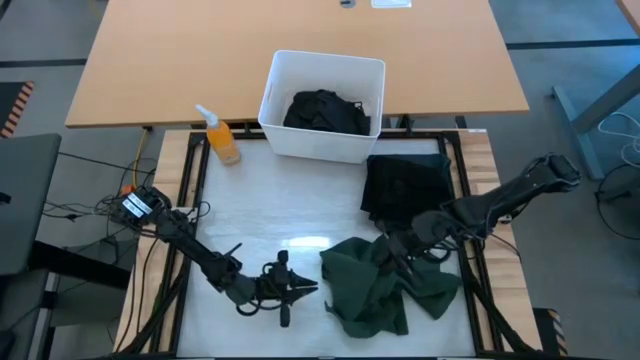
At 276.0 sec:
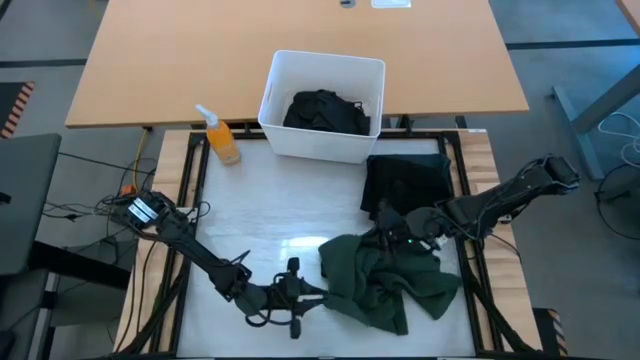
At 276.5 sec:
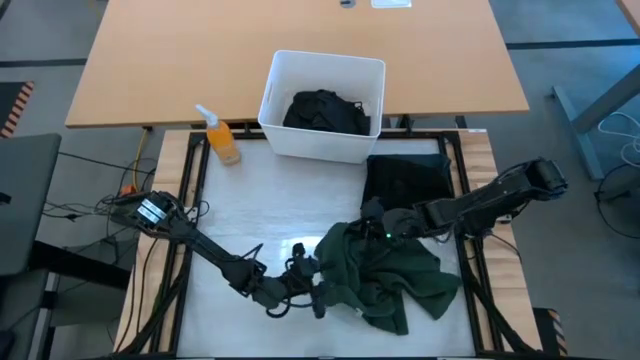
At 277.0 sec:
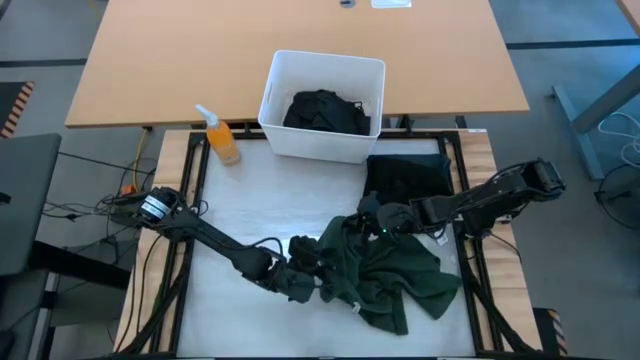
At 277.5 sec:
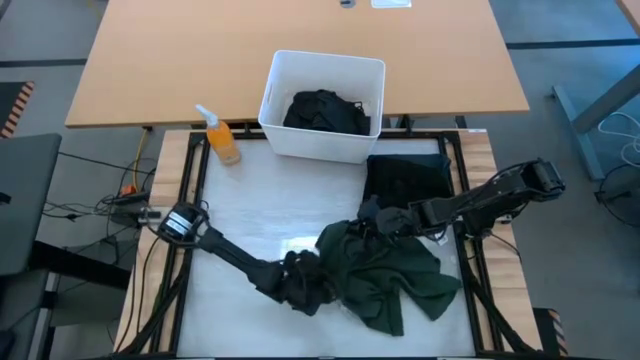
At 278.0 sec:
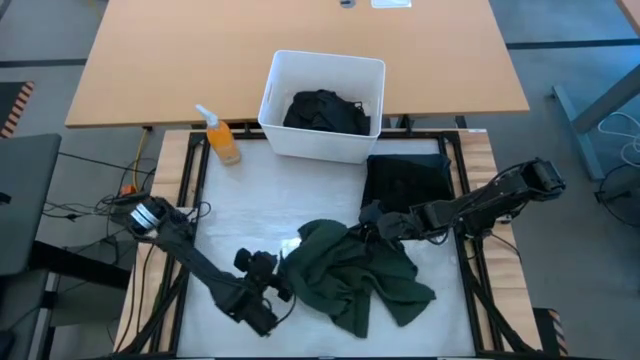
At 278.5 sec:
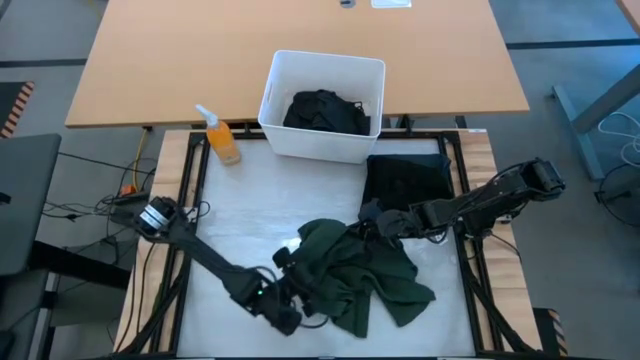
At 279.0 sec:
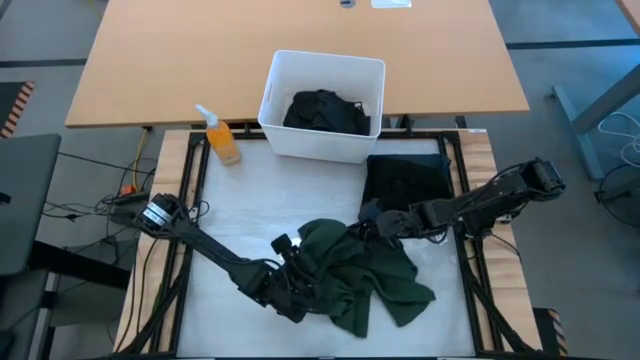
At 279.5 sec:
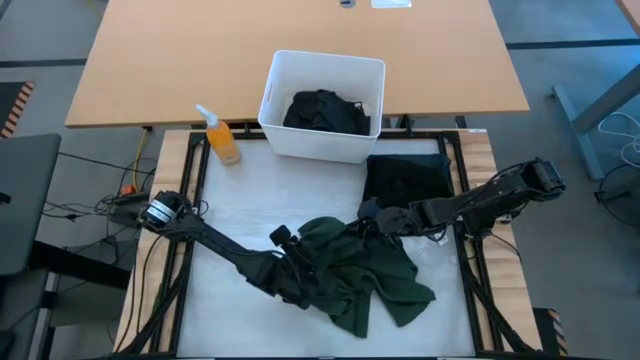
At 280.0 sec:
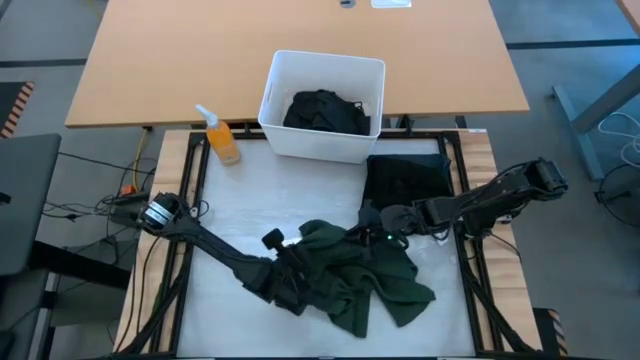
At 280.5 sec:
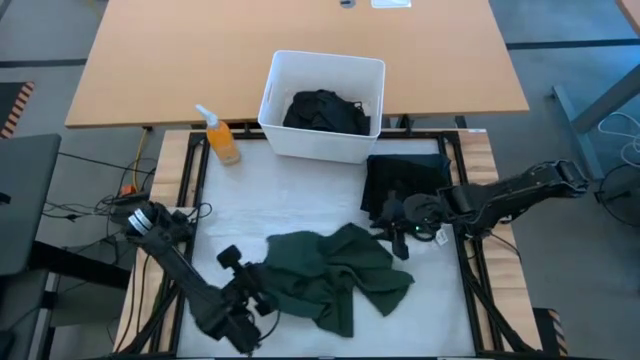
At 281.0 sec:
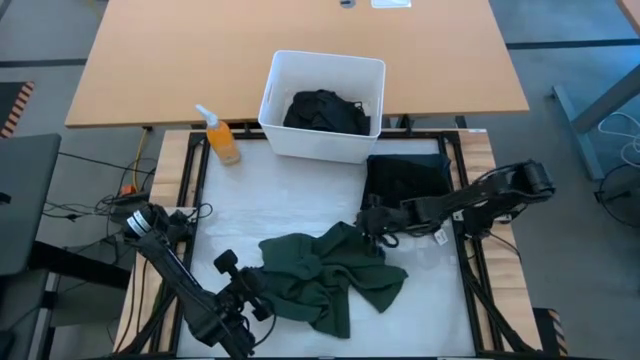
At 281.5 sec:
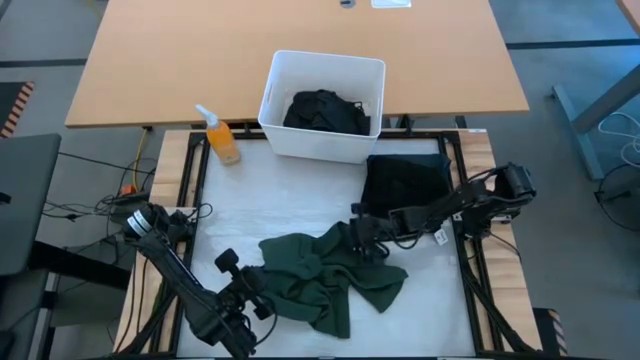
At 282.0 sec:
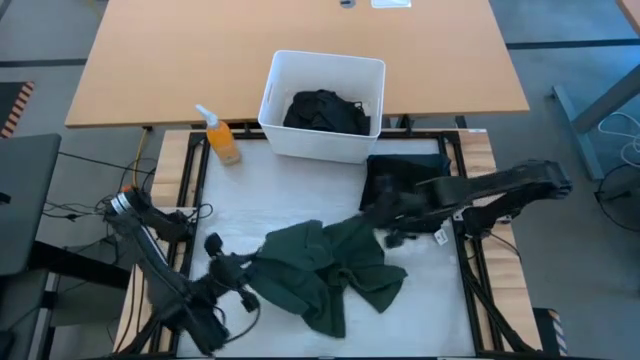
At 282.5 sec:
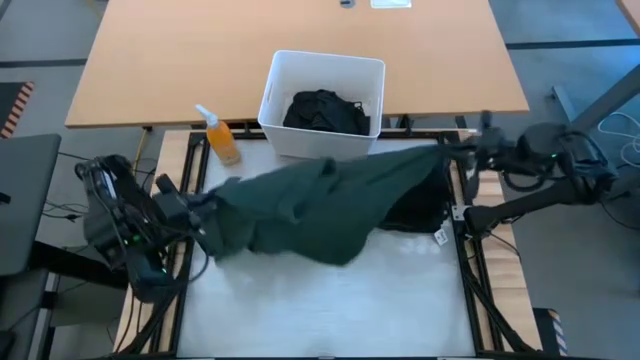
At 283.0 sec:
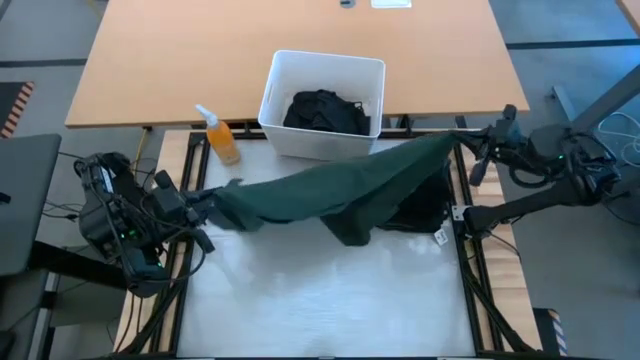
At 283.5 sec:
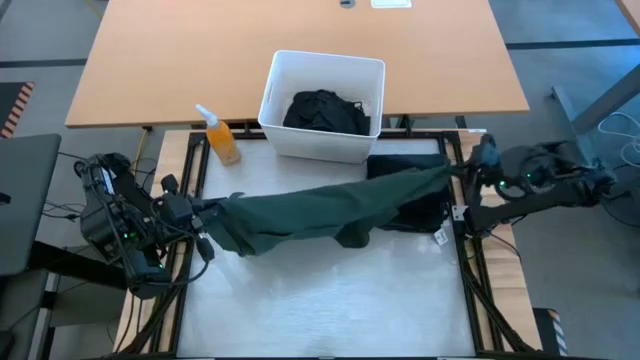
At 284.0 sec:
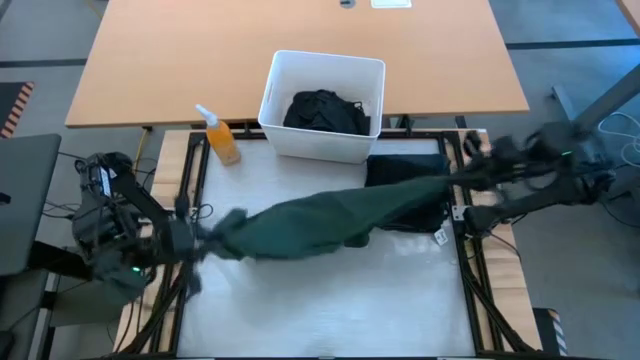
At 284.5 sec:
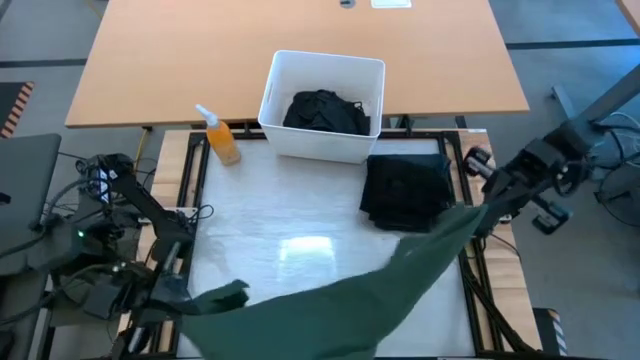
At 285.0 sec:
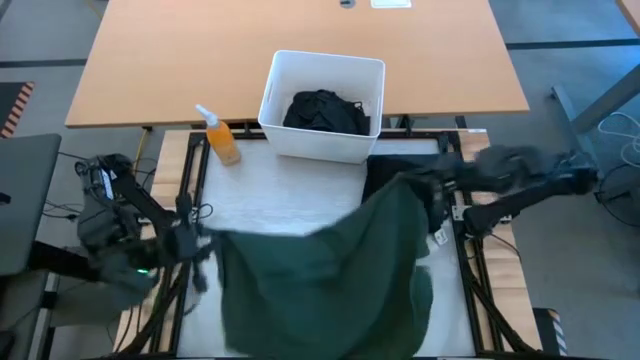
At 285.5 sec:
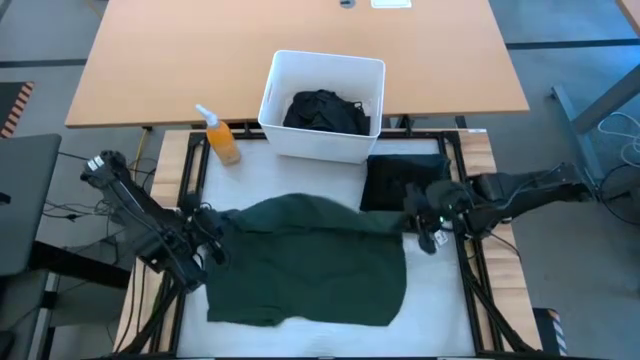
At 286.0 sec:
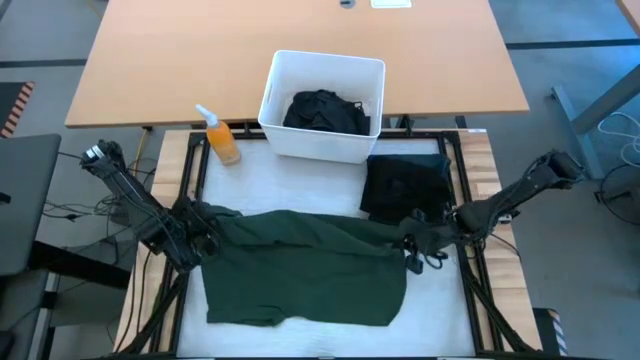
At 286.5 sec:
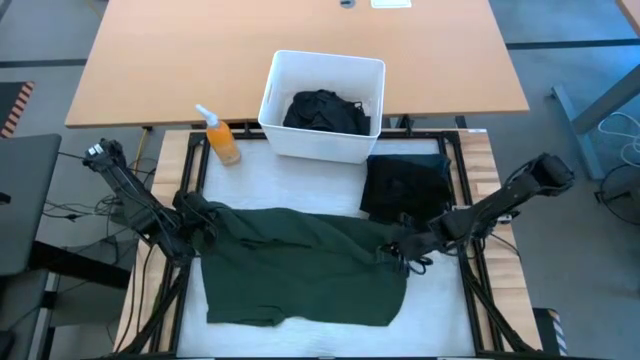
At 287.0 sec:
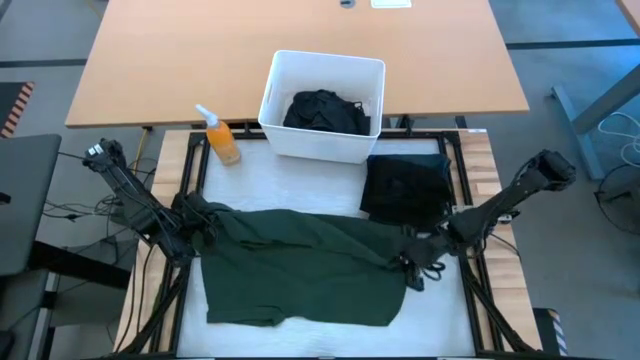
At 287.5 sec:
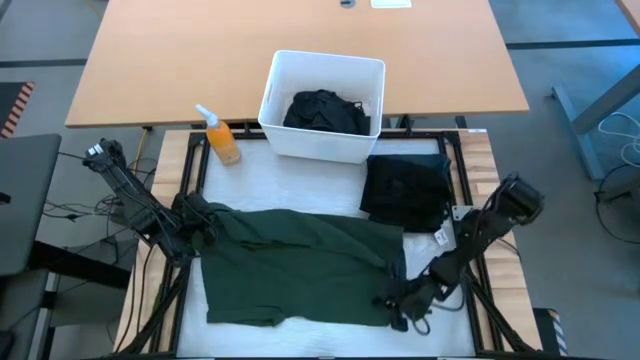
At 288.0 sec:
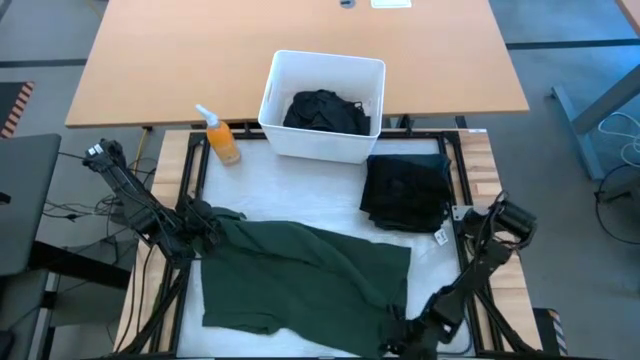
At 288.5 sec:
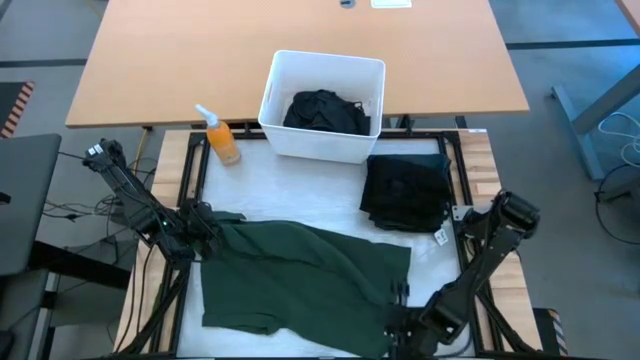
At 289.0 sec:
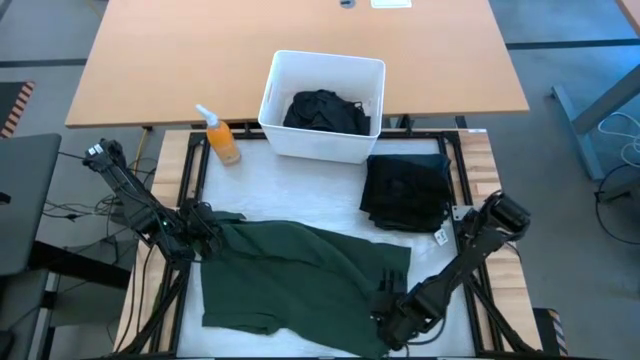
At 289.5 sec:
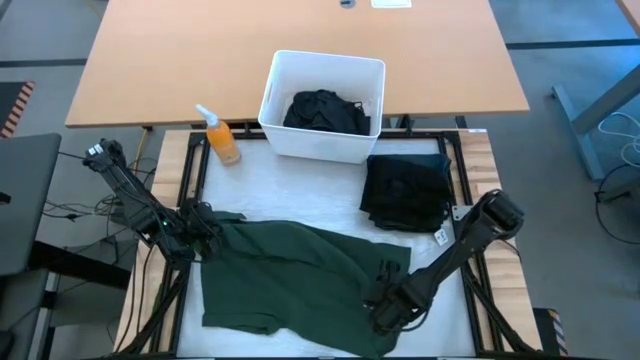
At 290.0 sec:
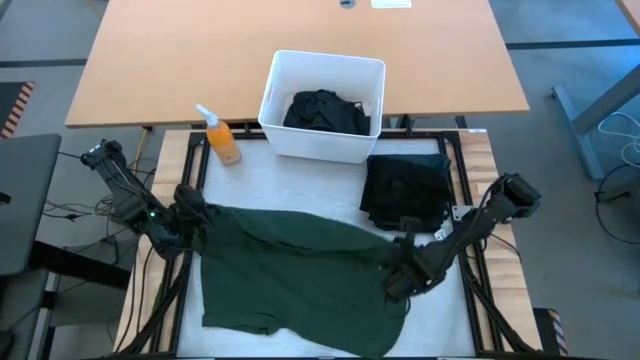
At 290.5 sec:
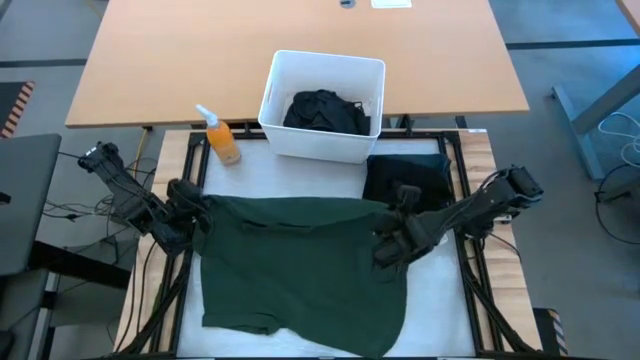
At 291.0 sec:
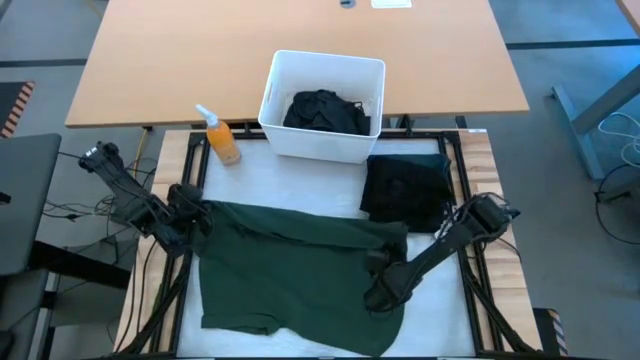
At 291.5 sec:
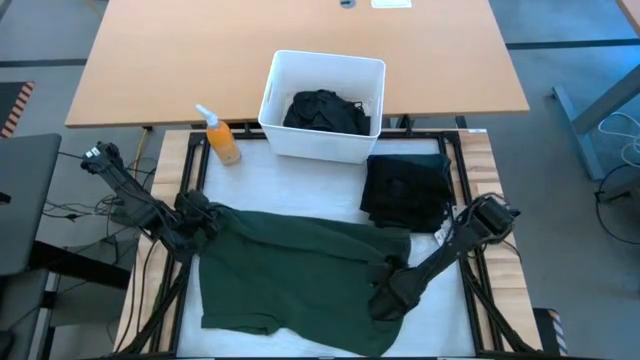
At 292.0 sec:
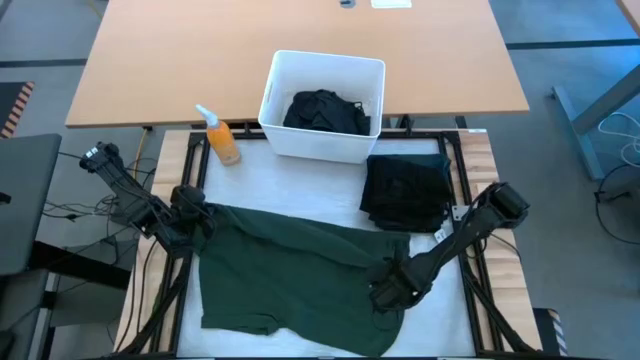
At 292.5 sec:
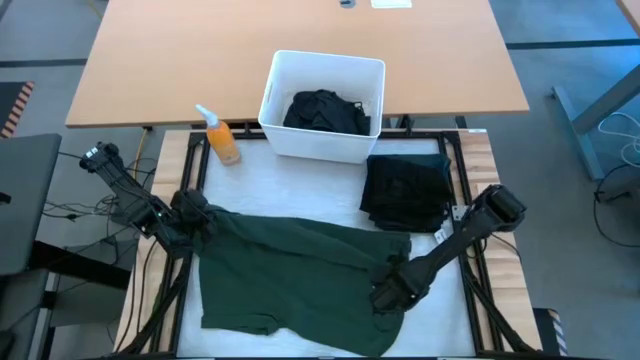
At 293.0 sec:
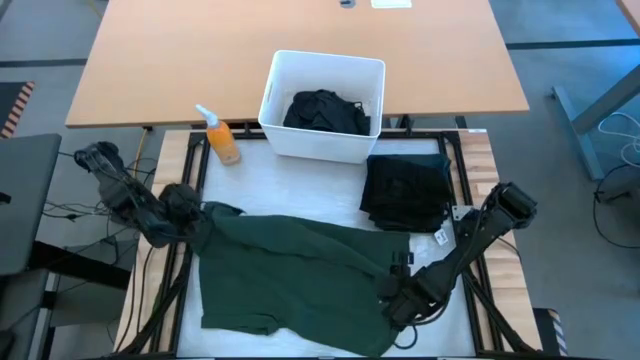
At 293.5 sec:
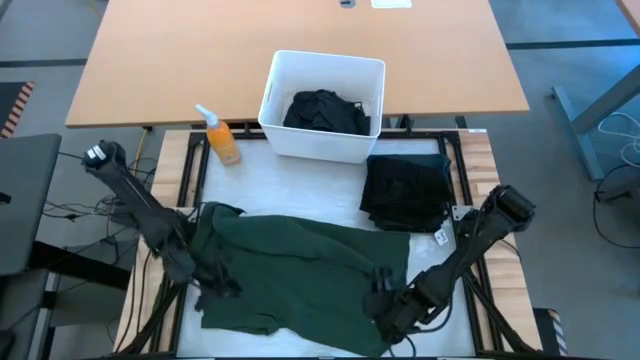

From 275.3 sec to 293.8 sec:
Task: Fold laundry
Fold the green polo shirt
